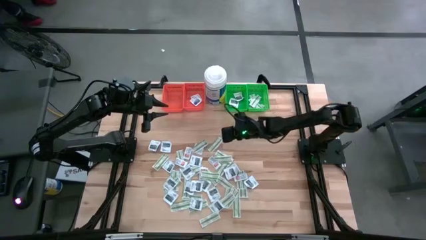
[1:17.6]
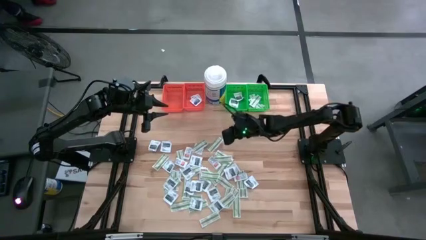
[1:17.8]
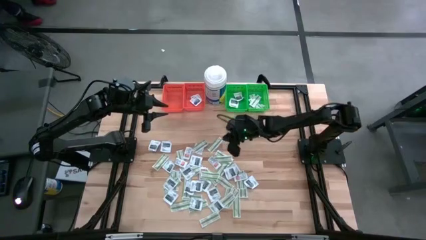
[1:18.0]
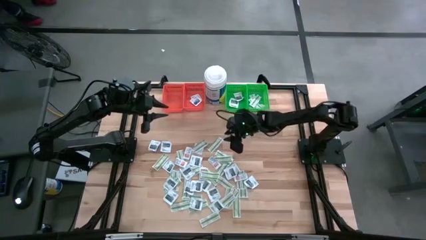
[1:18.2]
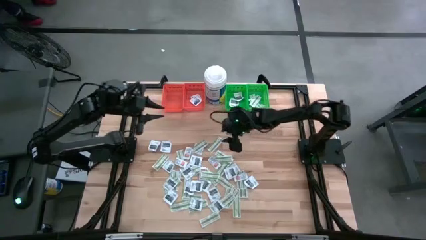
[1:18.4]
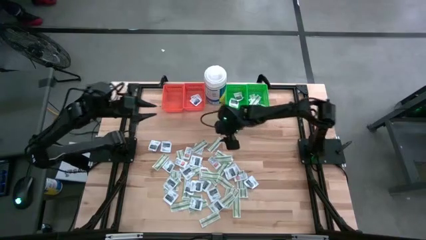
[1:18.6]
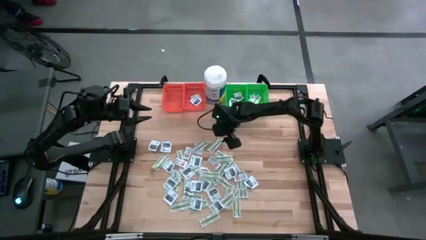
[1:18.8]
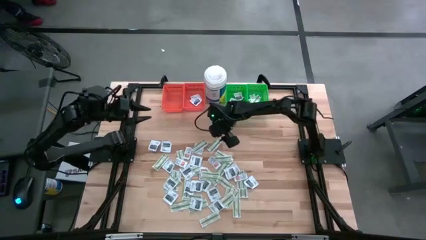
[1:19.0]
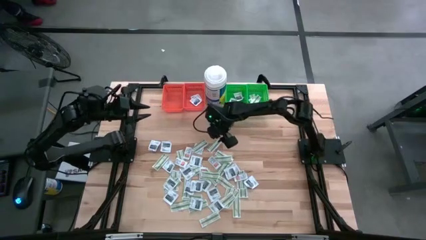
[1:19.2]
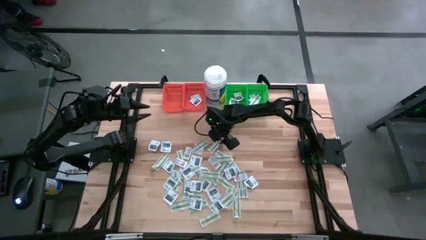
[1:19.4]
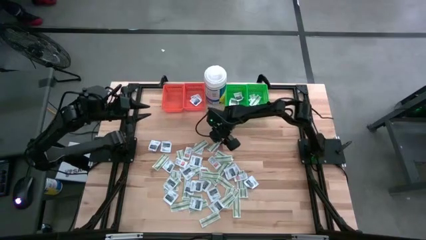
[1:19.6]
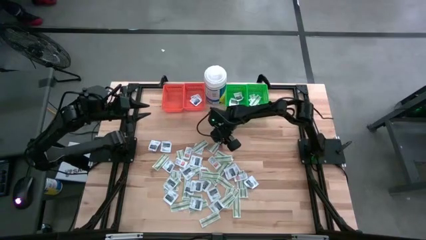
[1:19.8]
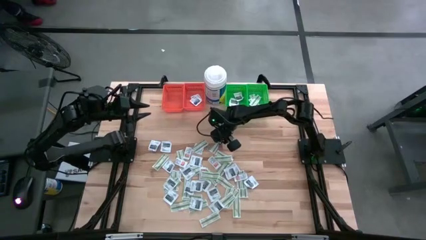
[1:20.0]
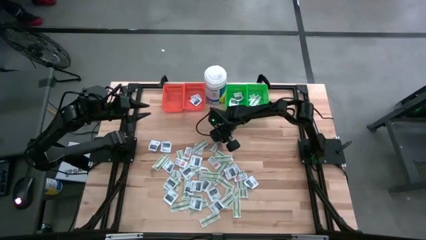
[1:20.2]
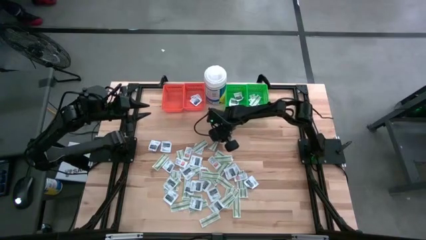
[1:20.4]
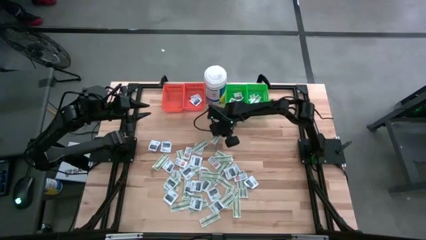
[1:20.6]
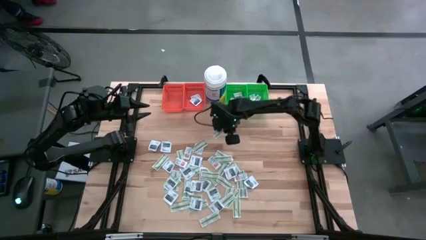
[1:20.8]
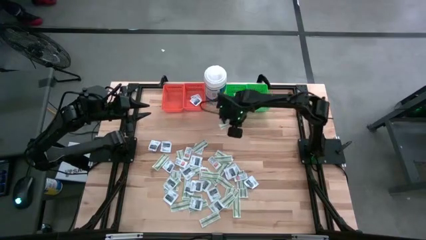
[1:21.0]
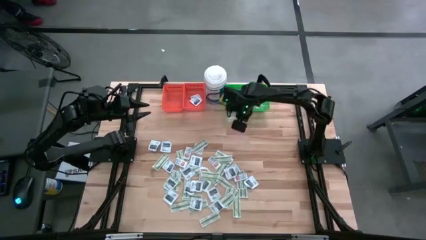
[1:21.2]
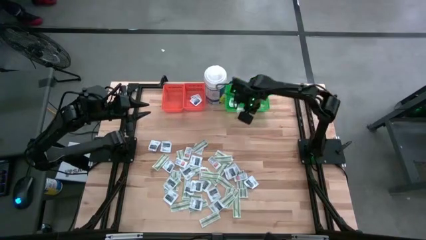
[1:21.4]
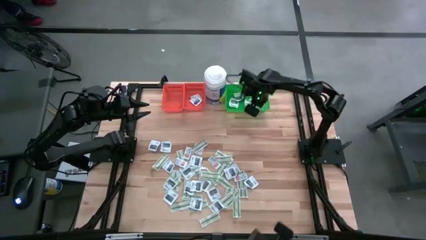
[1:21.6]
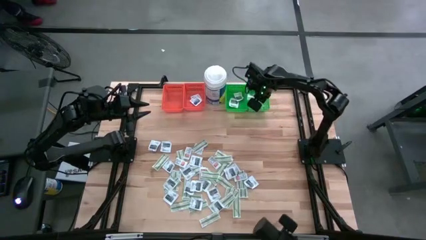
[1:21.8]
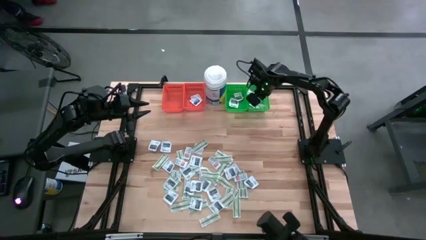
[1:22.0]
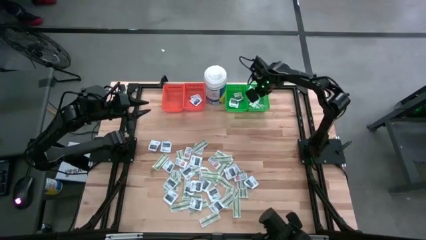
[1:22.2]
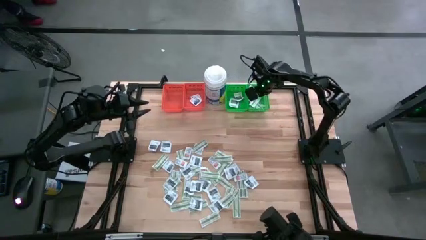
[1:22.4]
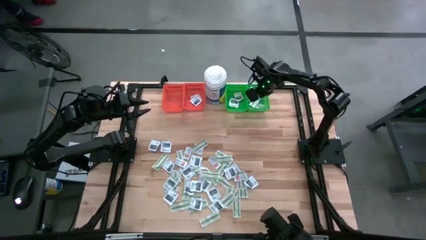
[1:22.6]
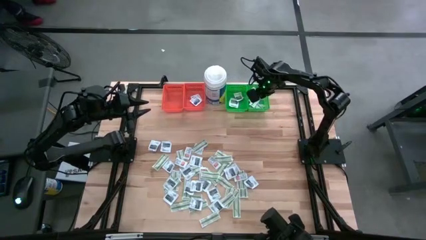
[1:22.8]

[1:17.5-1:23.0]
Task: Pick & Place First Aid Supplies
Put the green bandage pack into the right green bin

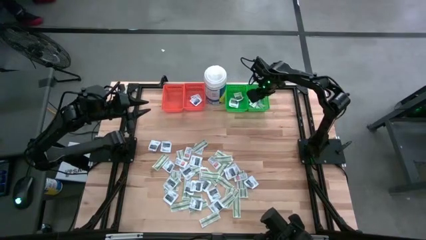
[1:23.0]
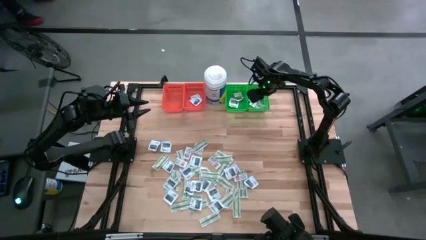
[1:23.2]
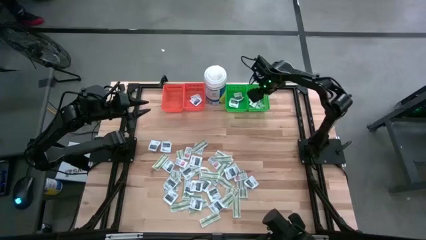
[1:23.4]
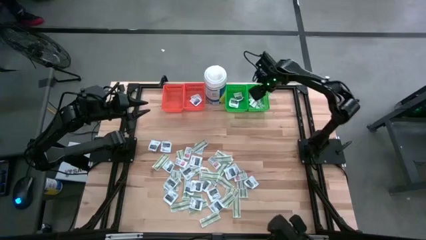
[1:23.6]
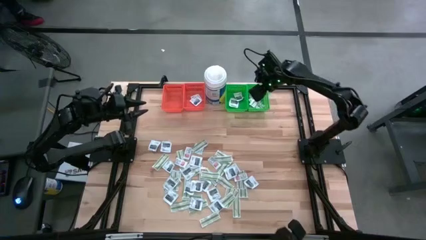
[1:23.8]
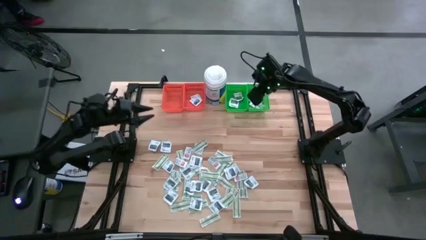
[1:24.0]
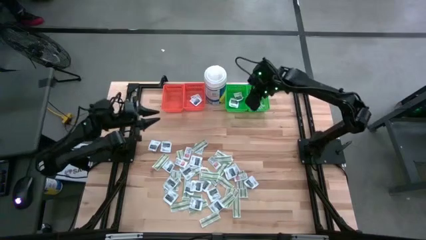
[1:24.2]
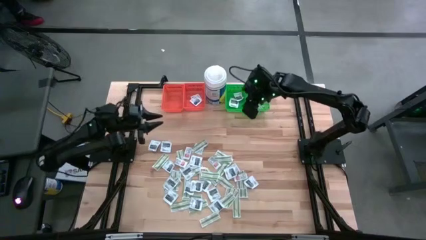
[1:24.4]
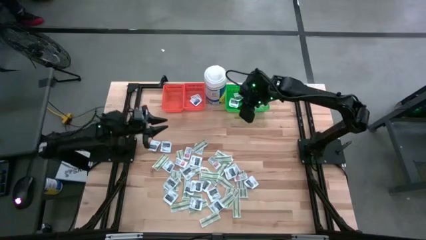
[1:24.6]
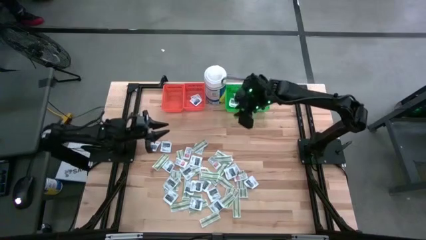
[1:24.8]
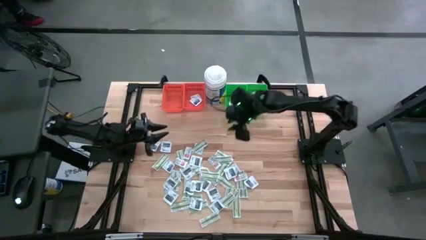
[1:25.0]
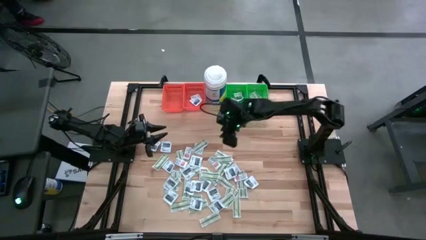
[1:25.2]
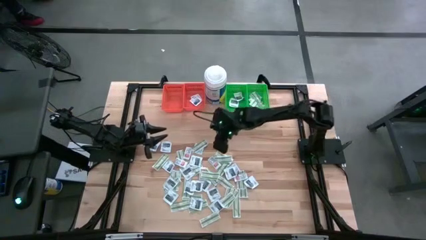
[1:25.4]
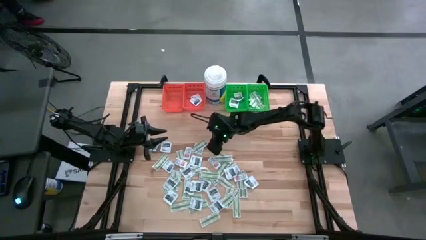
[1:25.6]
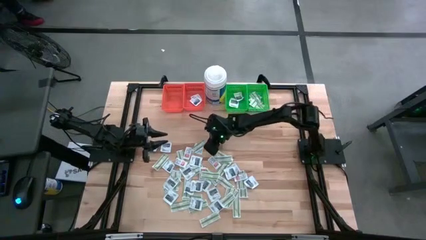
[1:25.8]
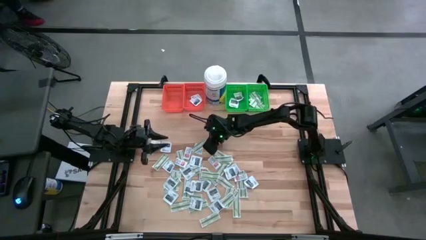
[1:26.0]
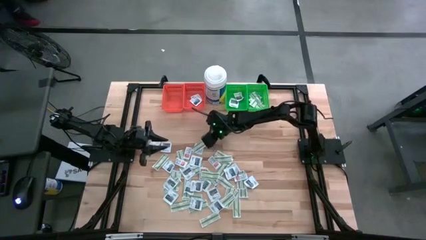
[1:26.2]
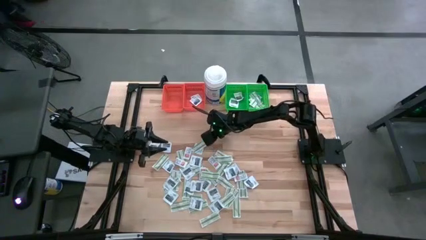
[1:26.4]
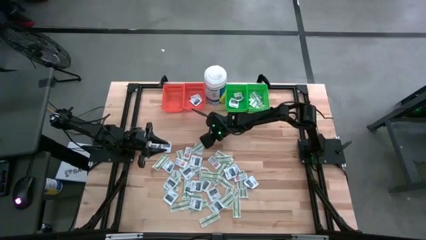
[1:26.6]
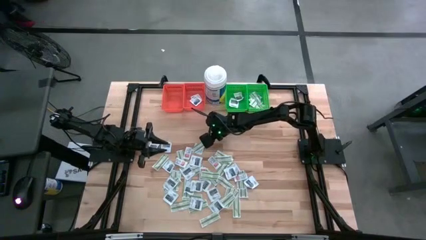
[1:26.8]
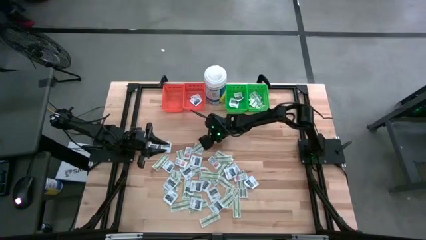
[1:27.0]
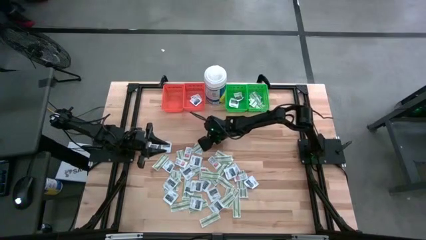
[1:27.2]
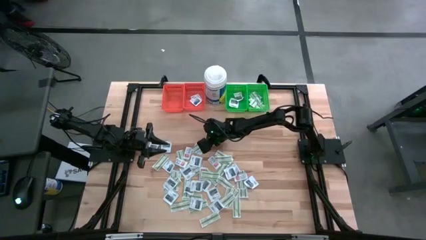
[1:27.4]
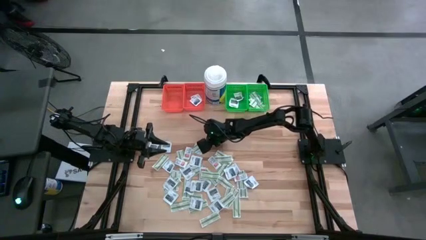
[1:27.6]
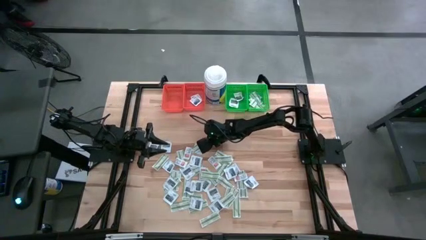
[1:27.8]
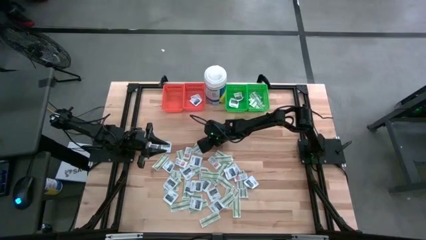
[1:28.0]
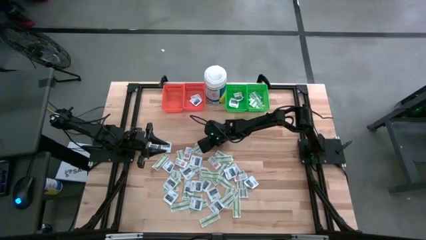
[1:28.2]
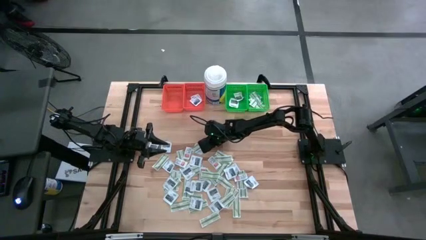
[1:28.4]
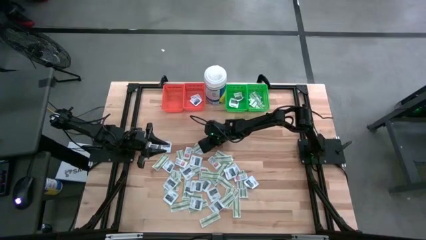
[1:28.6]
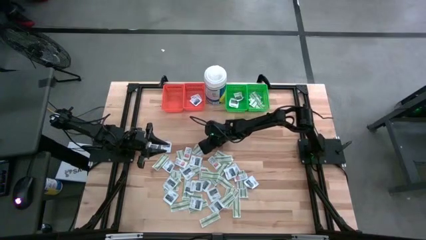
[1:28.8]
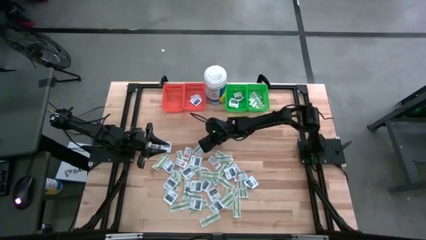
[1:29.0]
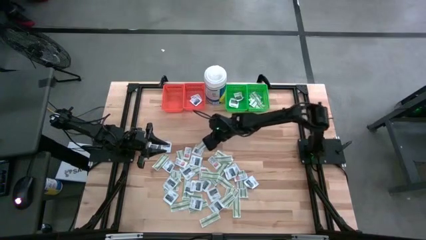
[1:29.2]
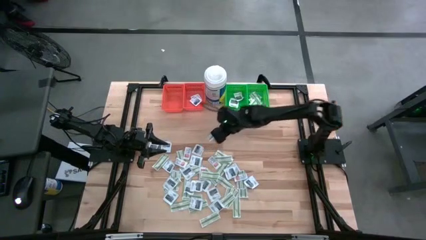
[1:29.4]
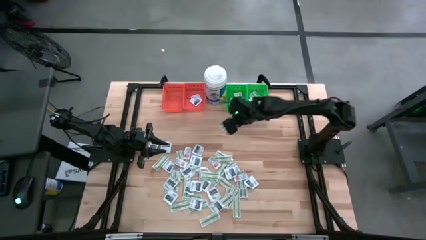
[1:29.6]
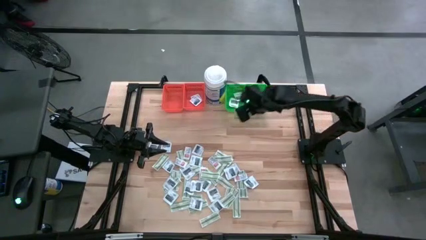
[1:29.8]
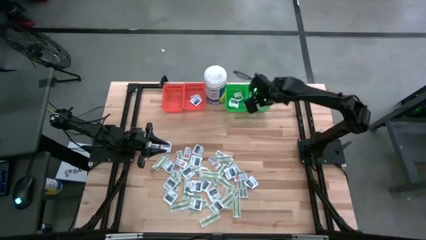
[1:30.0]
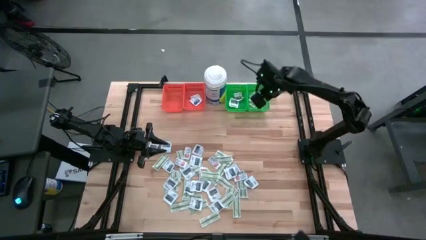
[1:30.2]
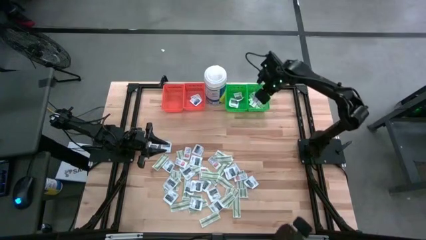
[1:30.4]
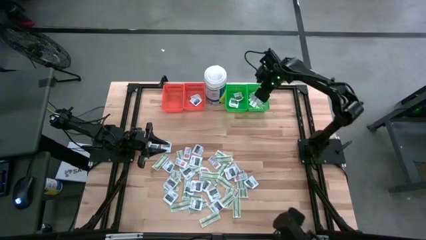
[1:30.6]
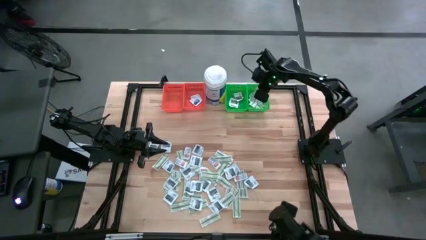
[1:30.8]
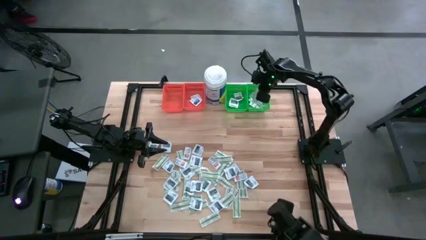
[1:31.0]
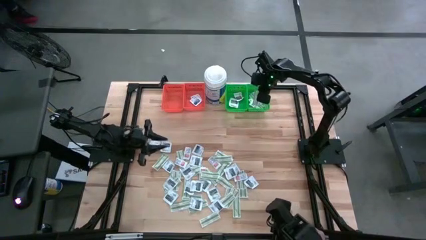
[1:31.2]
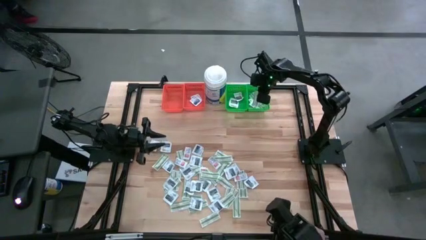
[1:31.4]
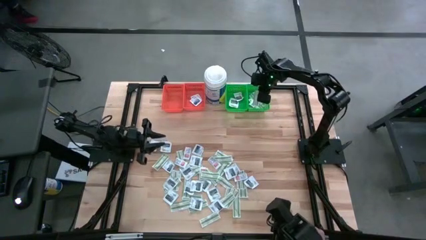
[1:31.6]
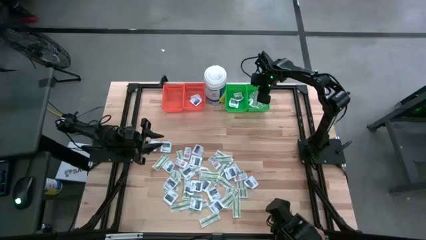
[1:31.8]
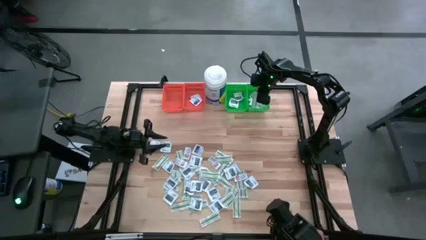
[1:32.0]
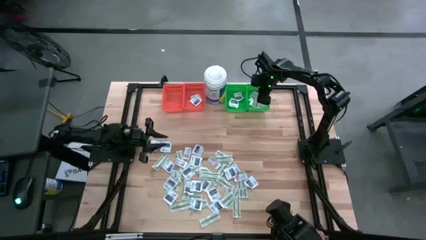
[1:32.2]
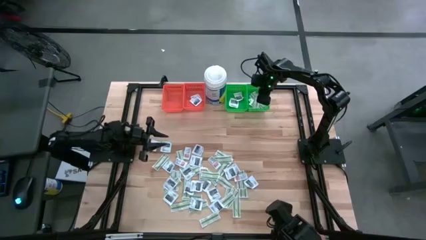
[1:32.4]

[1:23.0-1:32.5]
Put the green bandage pack into the right green bin
